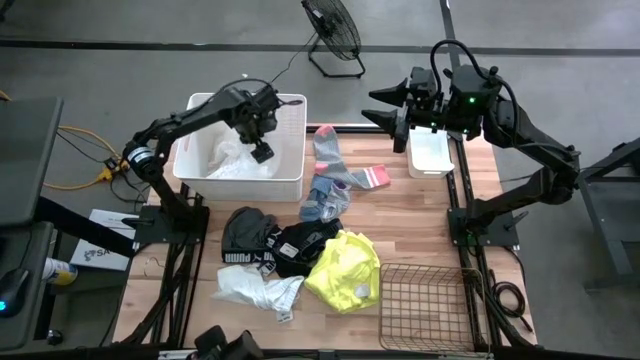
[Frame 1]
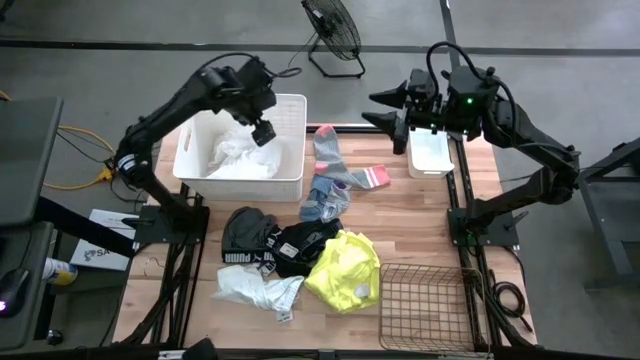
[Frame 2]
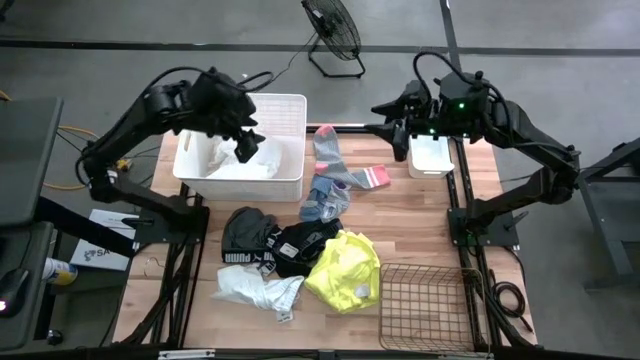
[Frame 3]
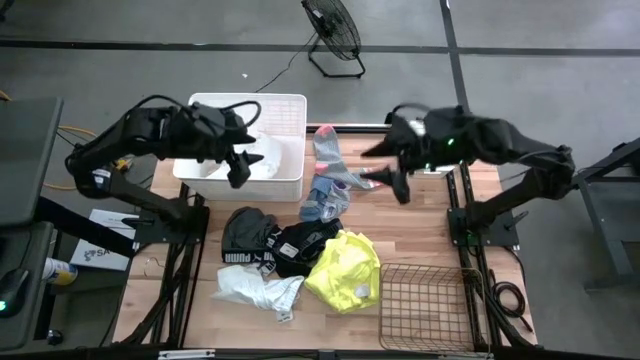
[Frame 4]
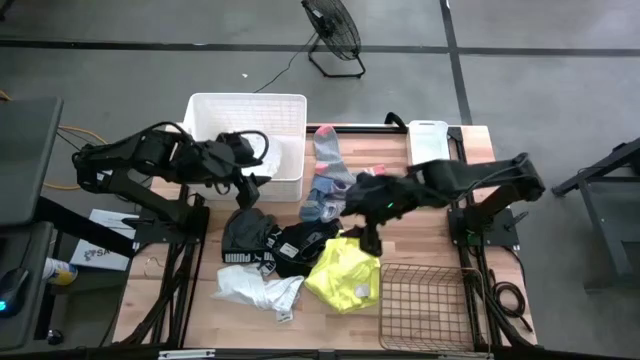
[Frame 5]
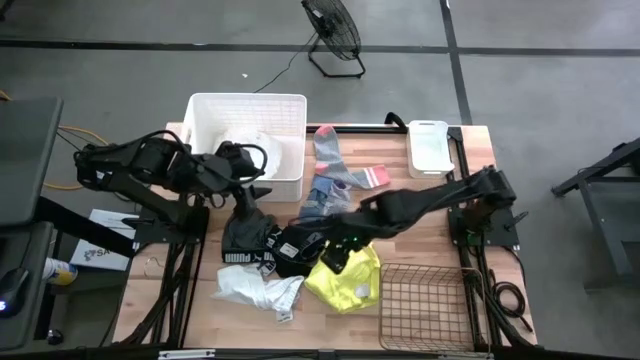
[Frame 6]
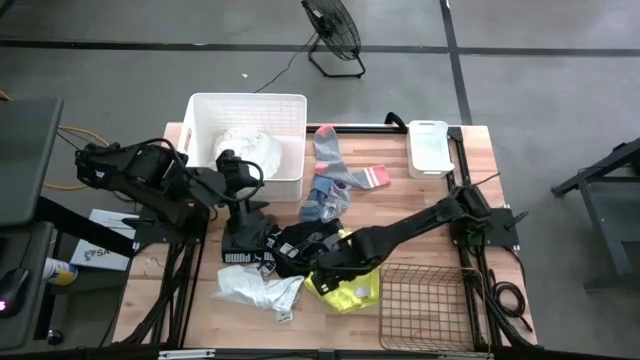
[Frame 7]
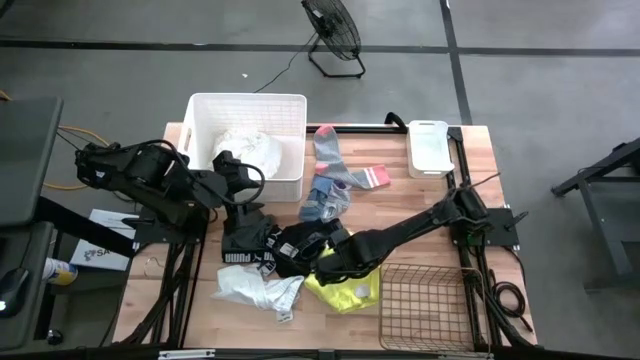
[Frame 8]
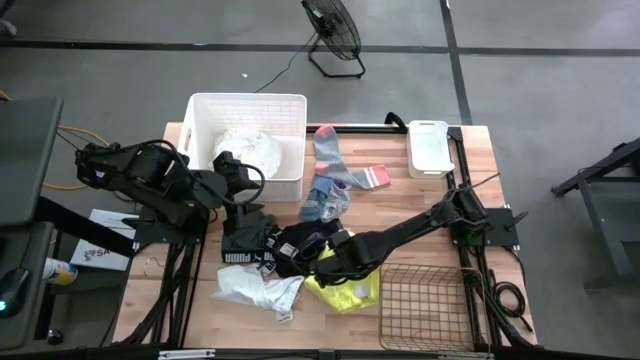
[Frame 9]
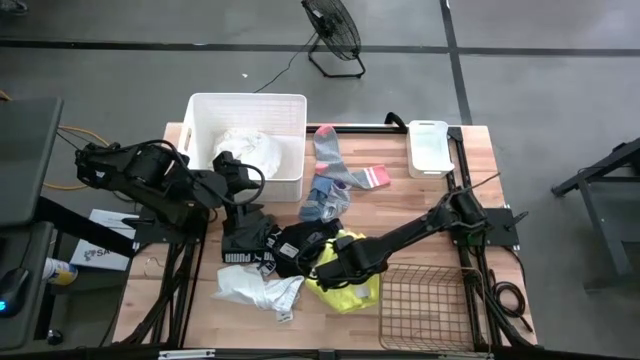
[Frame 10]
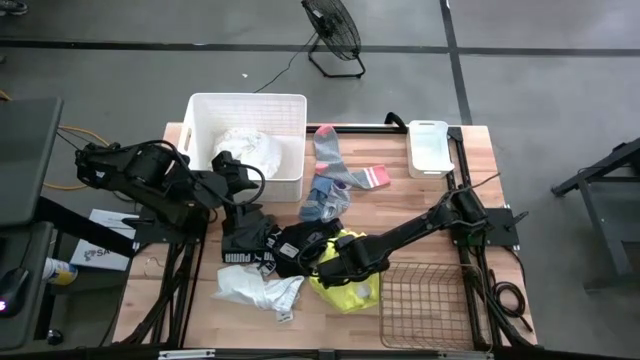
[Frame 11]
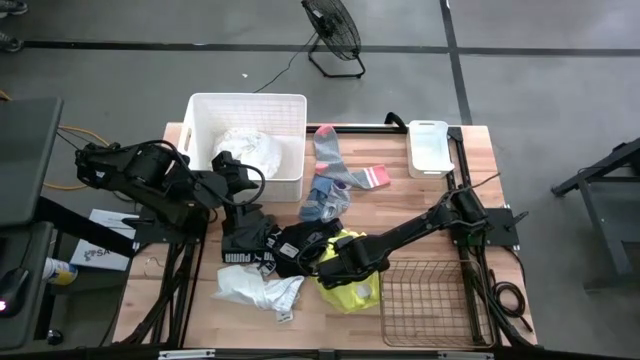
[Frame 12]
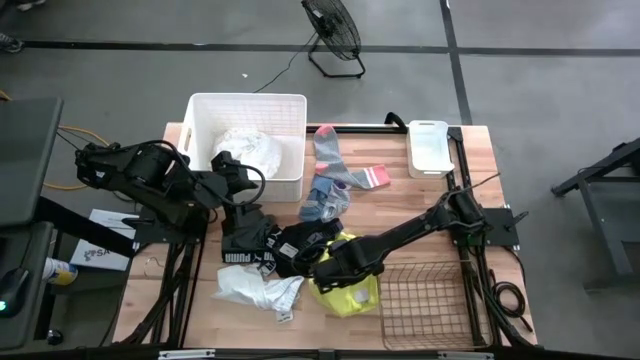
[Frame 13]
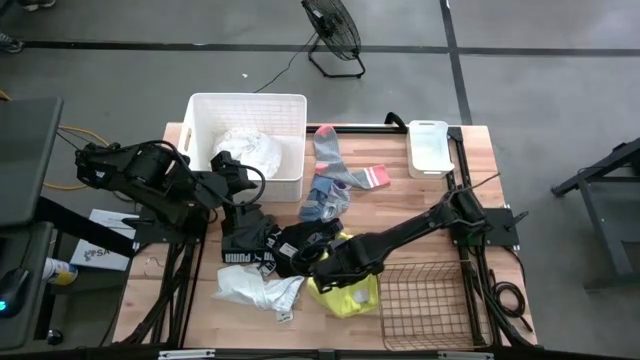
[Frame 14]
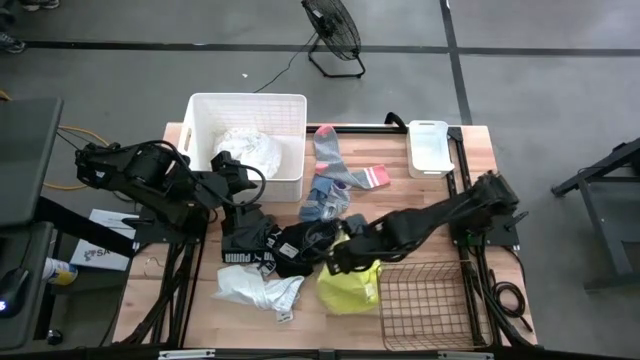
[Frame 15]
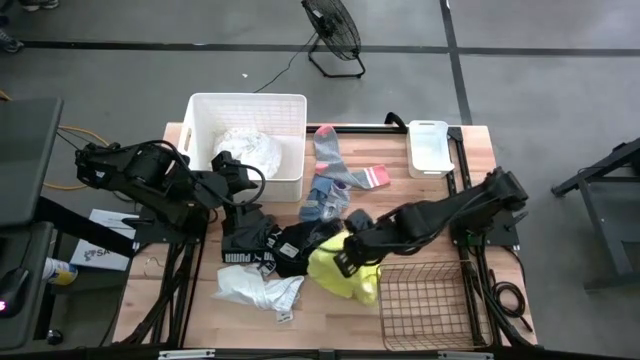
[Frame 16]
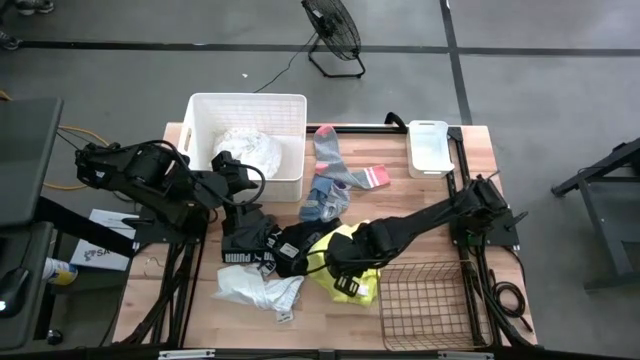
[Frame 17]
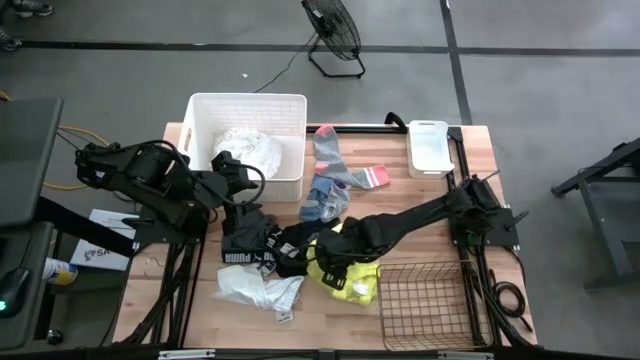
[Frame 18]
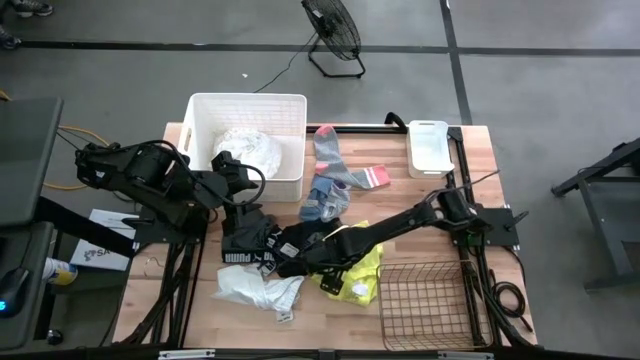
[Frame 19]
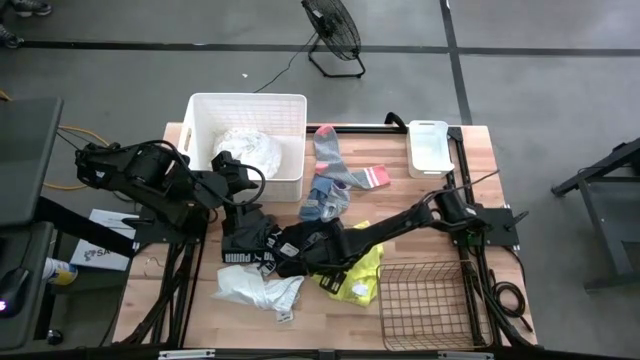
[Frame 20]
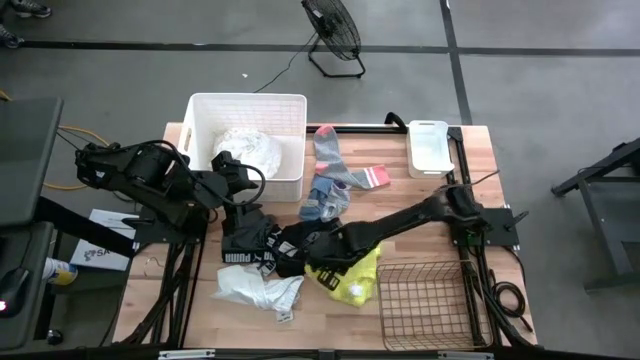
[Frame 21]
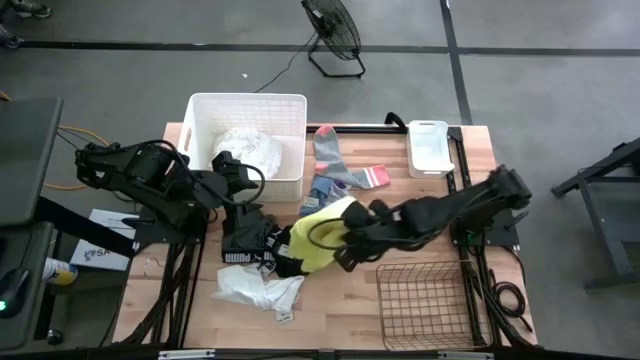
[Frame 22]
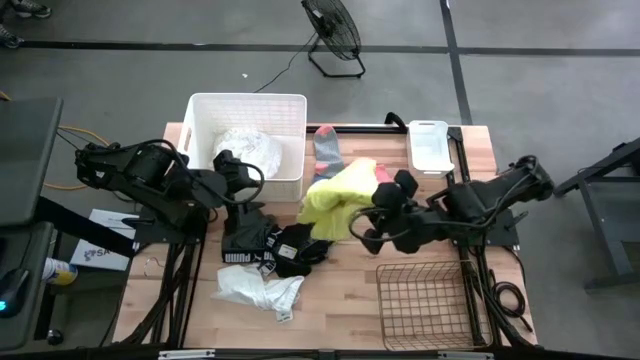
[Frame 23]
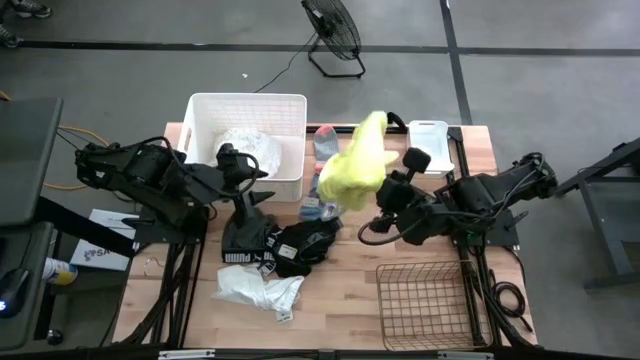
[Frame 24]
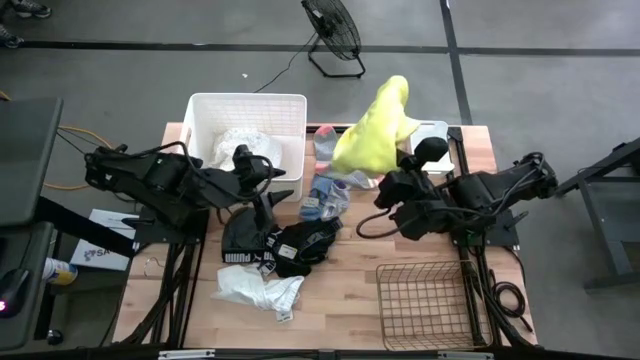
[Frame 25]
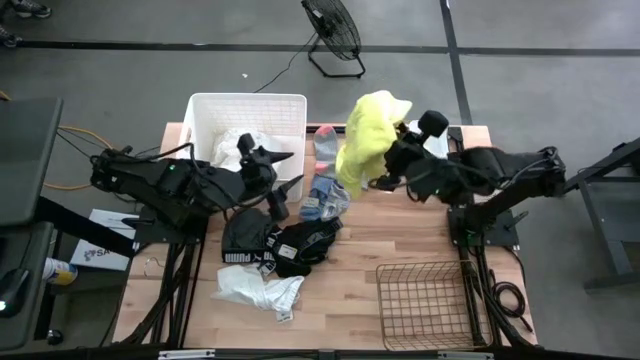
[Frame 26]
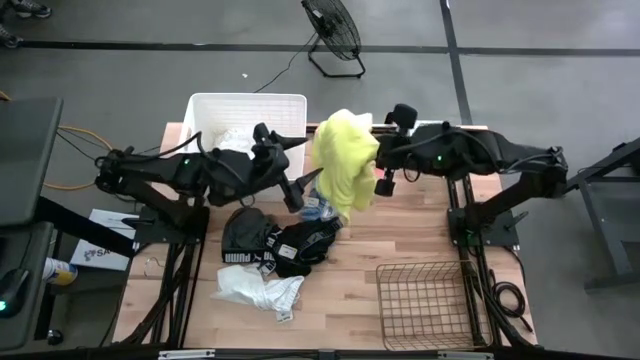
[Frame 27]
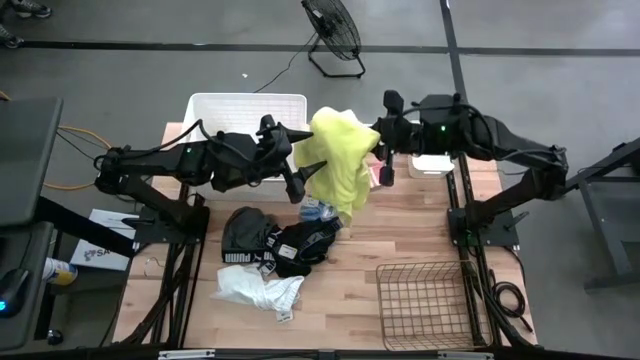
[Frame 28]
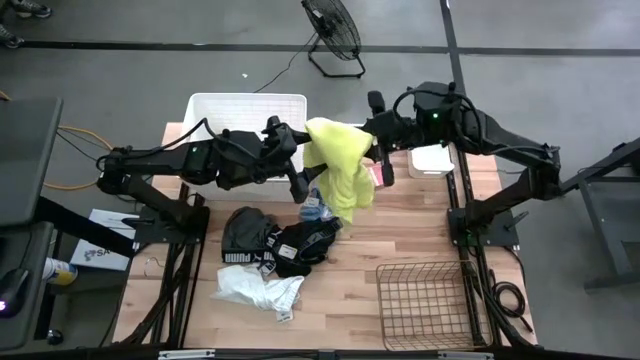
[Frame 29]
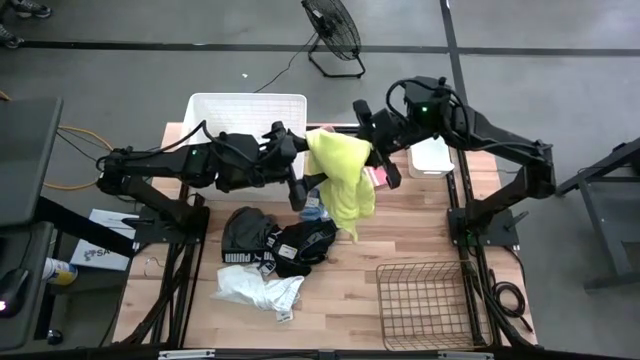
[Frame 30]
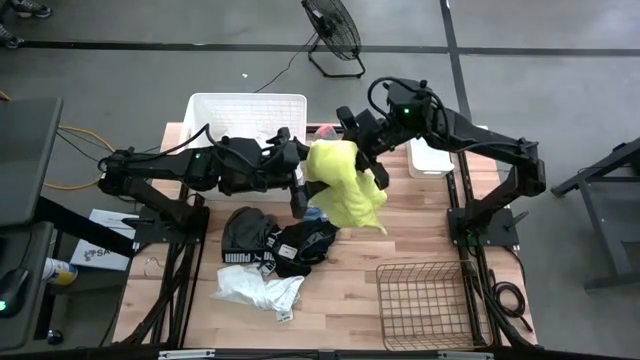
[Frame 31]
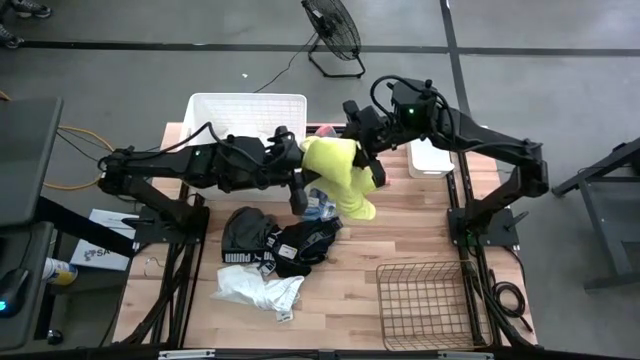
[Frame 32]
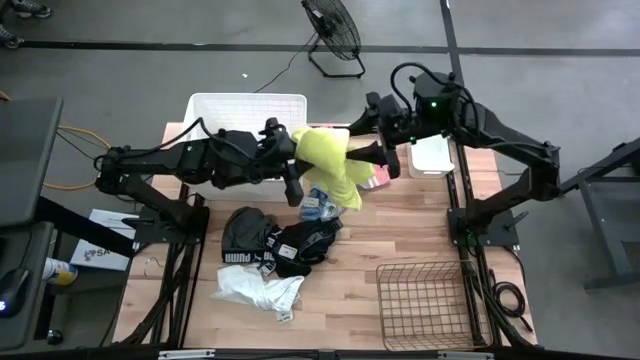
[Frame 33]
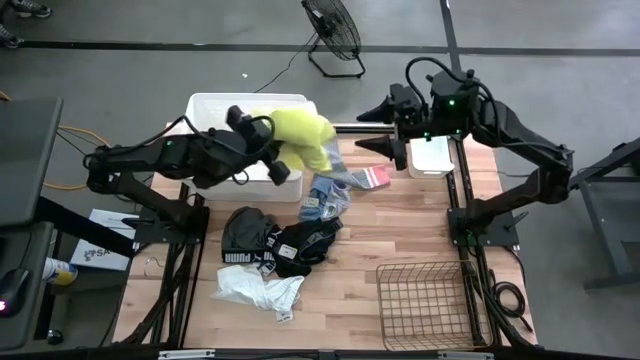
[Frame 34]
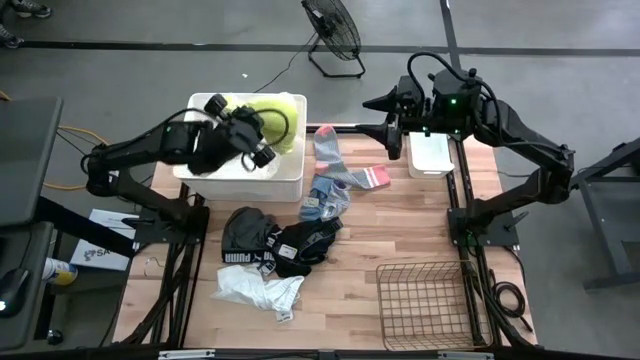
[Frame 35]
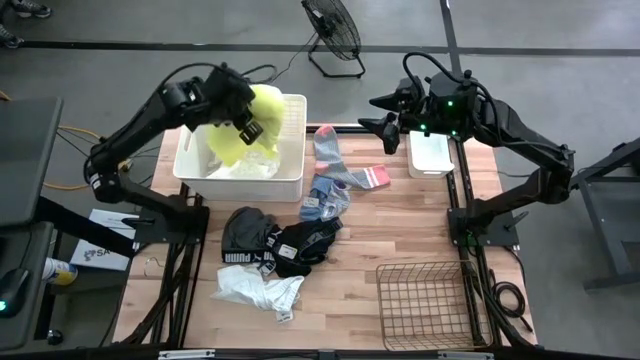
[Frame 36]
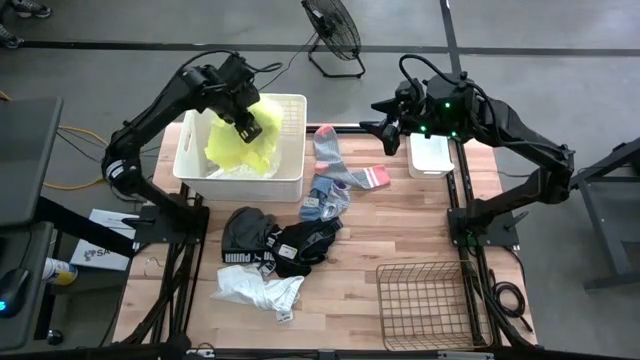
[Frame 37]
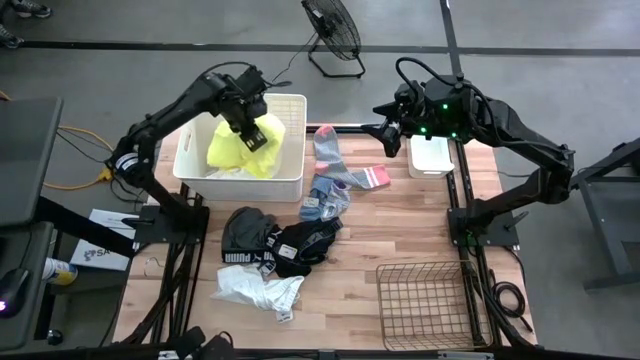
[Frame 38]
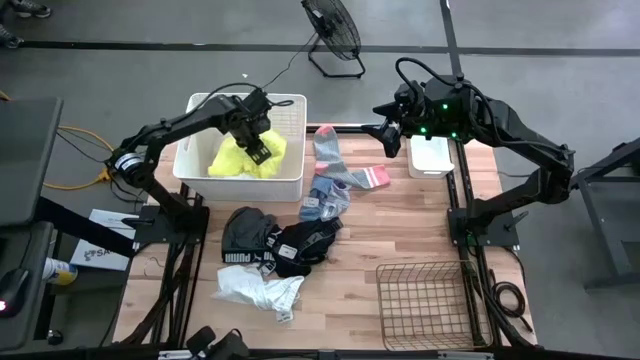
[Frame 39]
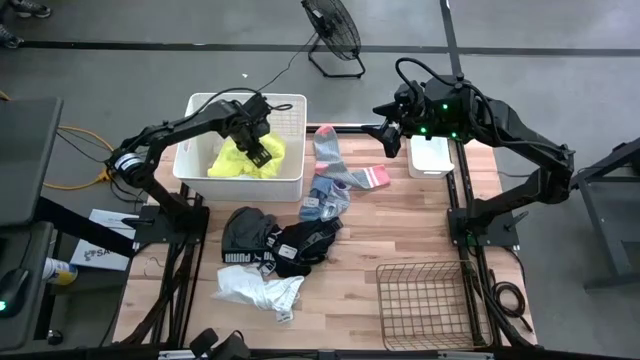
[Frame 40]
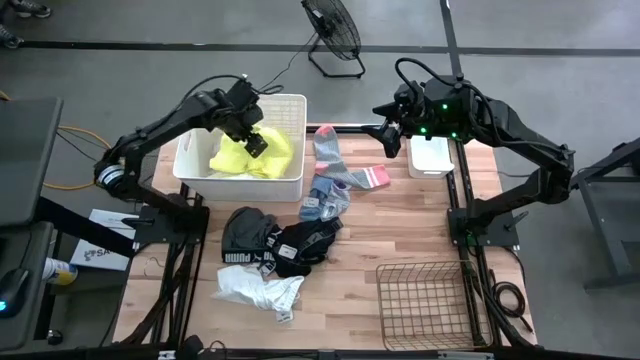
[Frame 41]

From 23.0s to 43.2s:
Task: Pick & Place Cloths
Put the yellow shirt into the big white bin
